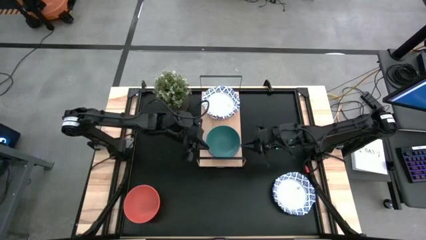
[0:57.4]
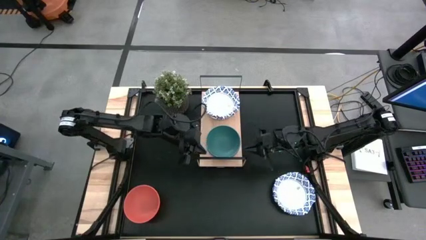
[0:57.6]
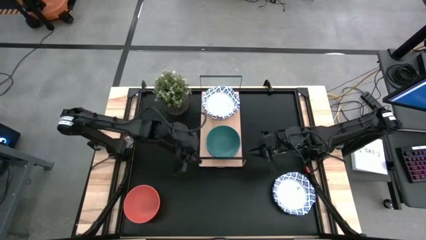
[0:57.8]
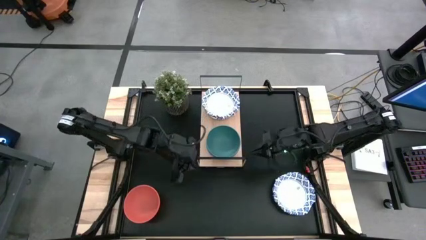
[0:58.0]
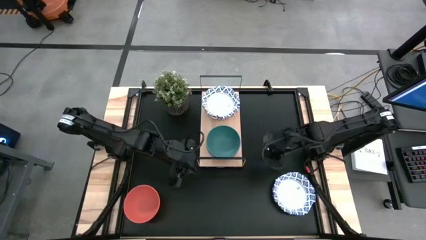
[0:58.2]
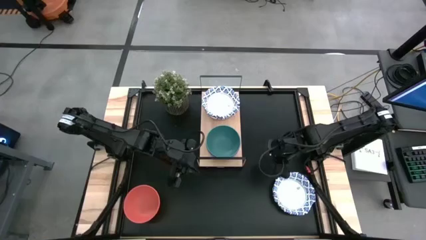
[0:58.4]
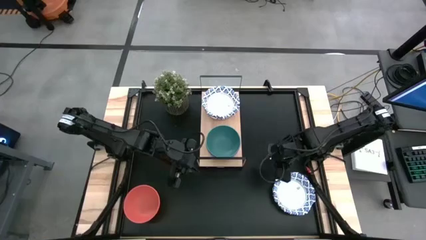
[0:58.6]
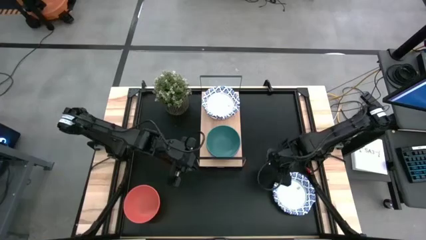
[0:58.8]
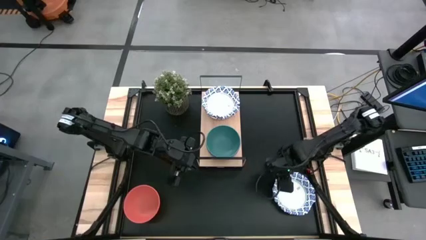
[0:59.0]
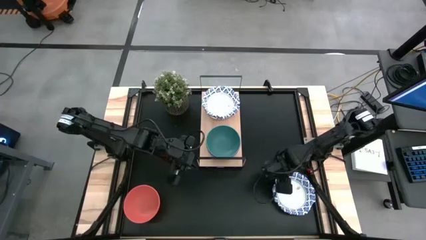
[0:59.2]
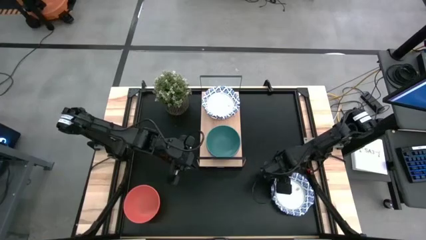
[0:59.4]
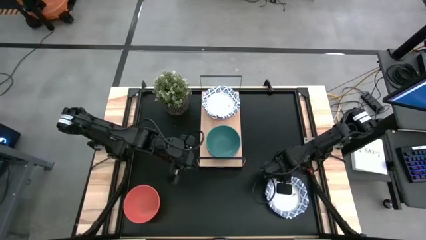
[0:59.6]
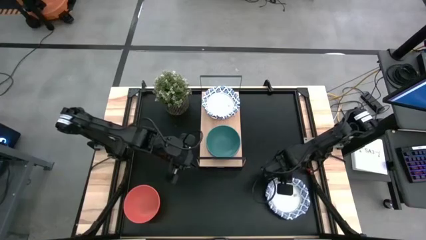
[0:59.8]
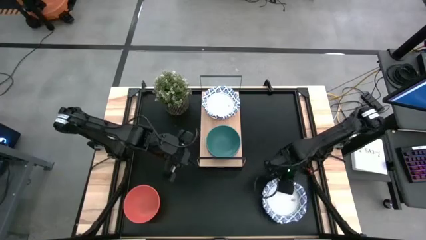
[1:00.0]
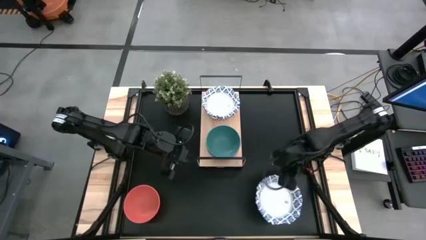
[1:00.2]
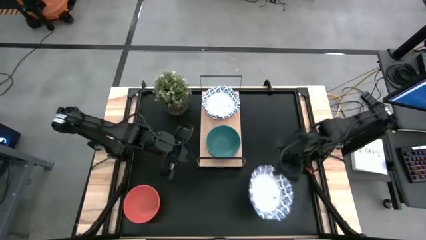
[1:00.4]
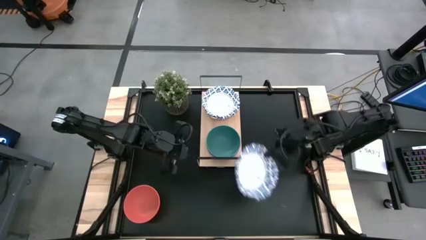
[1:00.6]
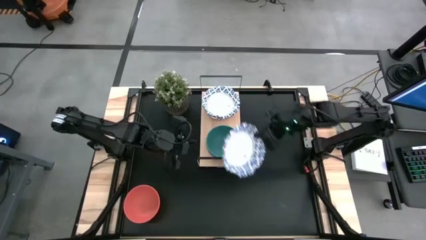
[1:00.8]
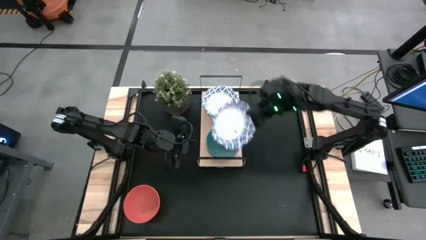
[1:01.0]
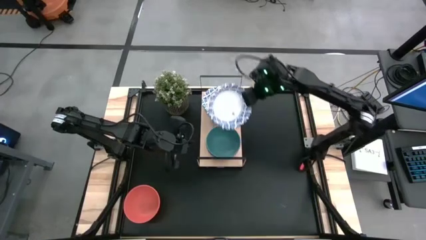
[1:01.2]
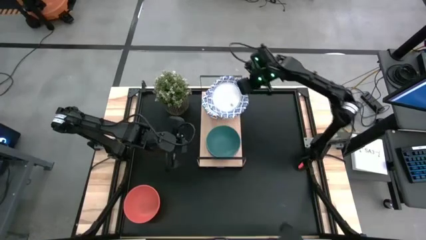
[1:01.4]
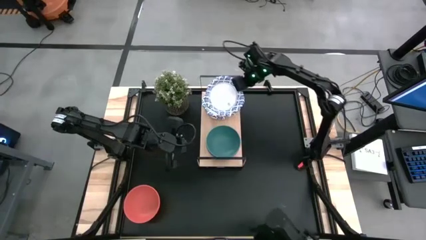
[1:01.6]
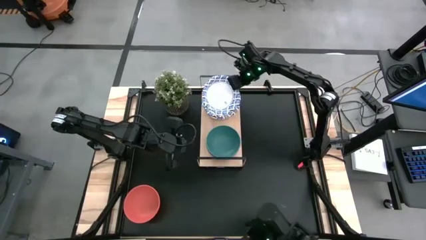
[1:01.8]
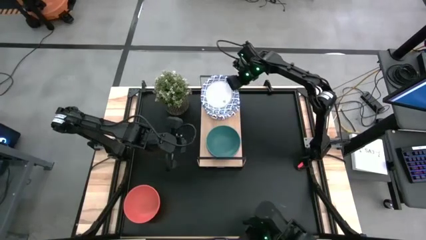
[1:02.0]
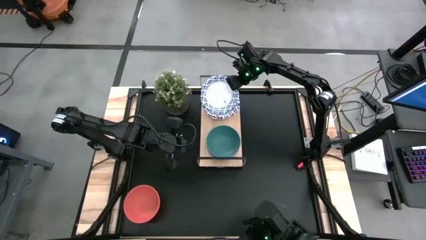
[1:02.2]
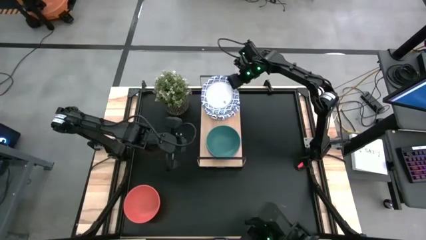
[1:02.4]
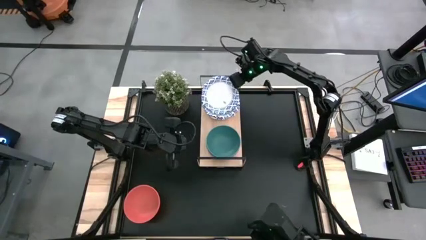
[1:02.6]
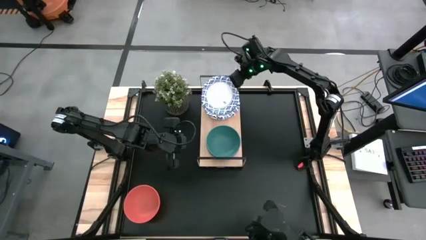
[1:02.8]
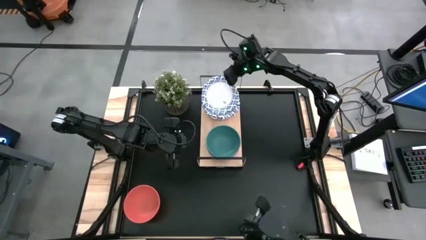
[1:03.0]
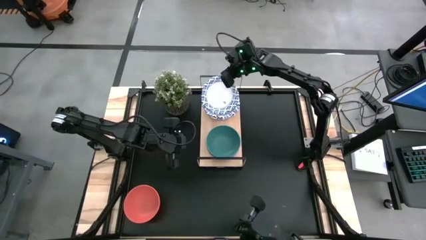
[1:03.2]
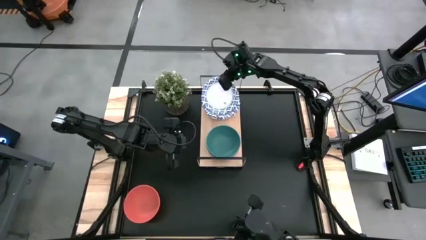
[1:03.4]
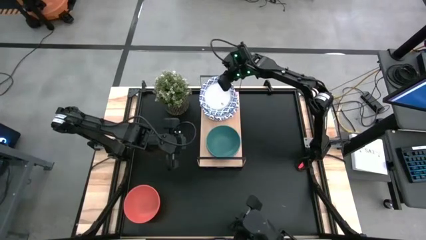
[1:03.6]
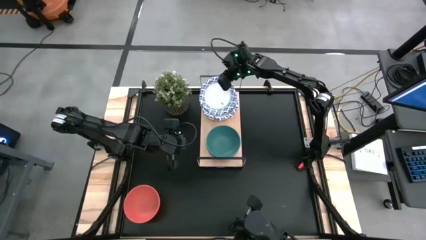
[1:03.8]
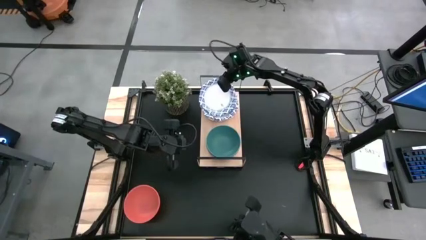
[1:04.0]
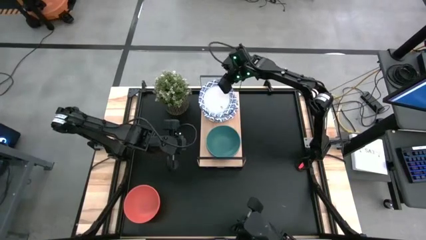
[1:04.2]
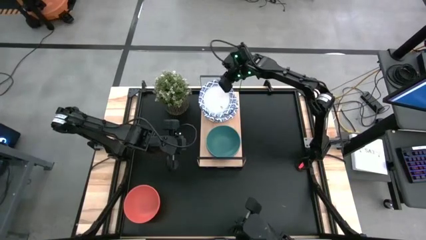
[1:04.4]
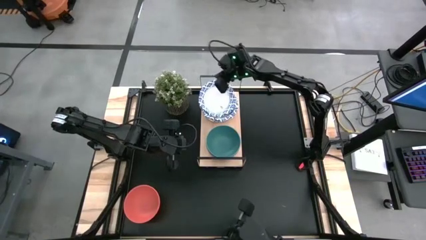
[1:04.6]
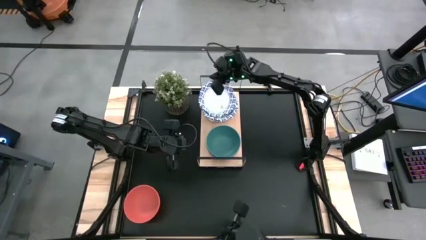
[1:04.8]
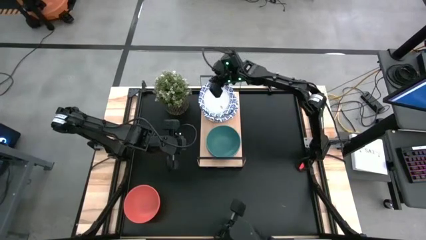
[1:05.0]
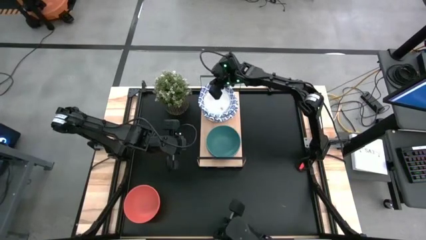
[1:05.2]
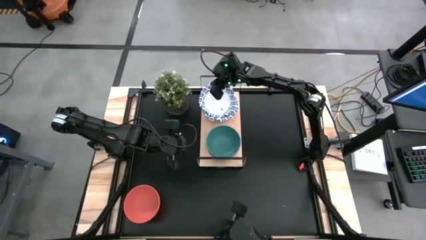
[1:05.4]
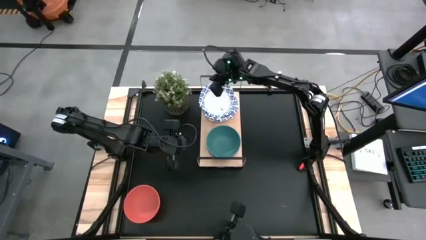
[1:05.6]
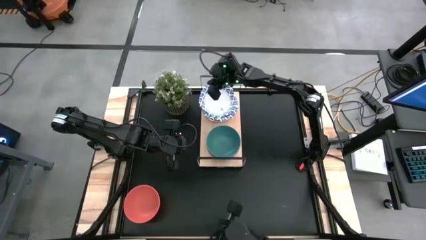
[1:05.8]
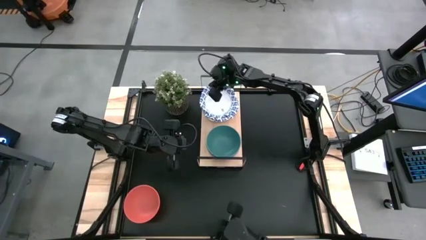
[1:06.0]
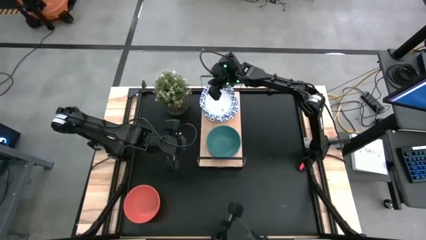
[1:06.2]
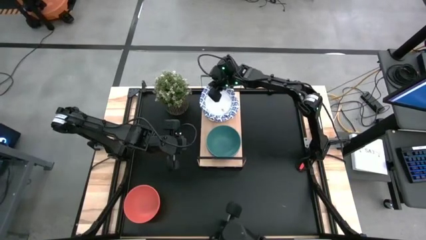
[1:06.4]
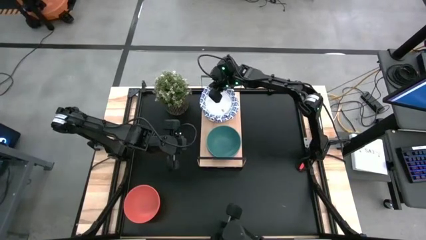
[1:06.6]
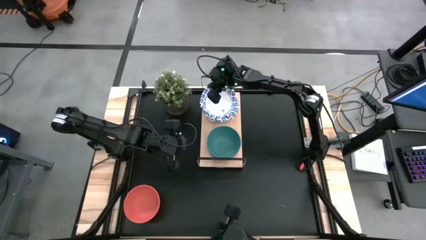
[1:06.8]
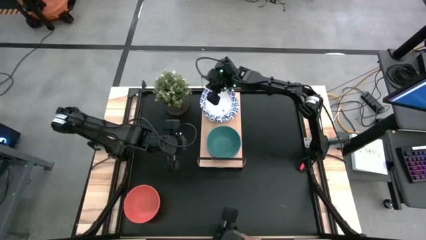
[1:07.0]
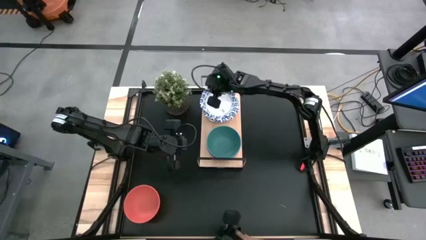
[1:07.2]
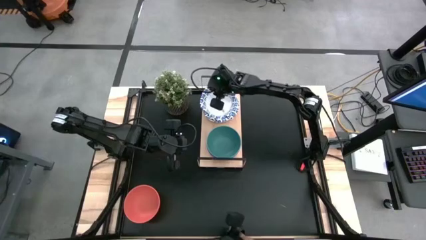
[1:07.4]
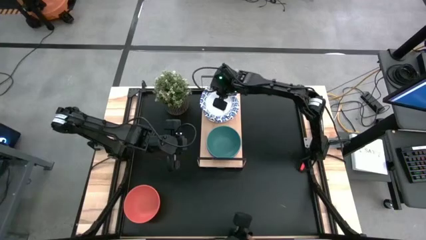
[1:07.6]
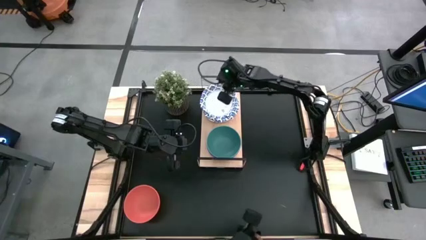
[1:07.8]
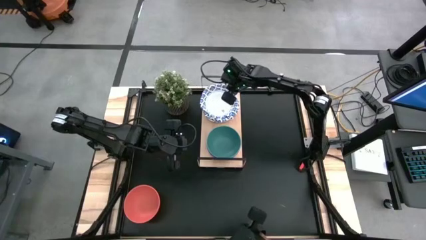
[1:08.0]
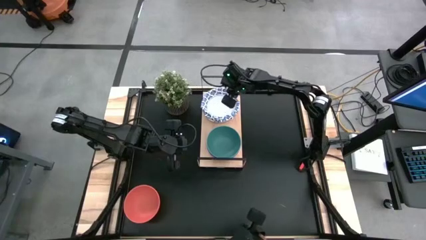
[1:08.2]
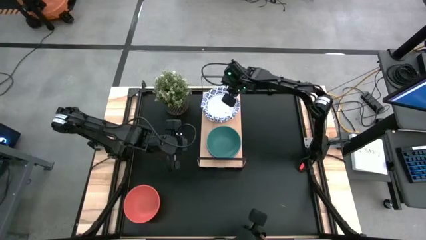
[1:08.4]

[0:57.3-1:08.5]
Task: Place and stack bowls onto a shelf
Stack the white paper bowl on top of the white paper bowl on the shelf

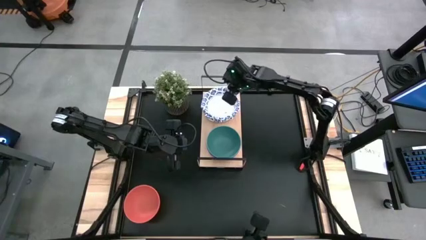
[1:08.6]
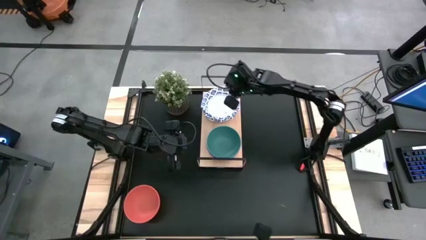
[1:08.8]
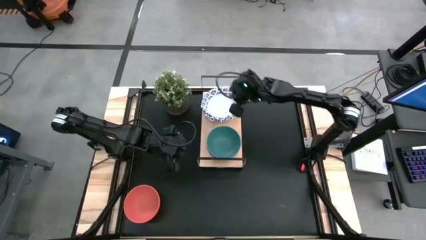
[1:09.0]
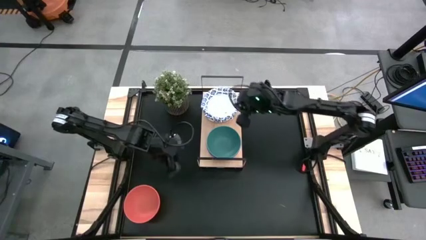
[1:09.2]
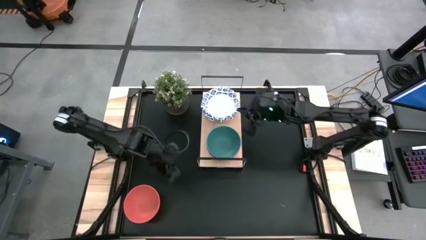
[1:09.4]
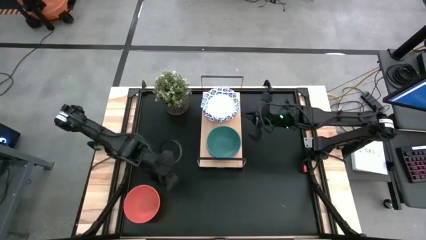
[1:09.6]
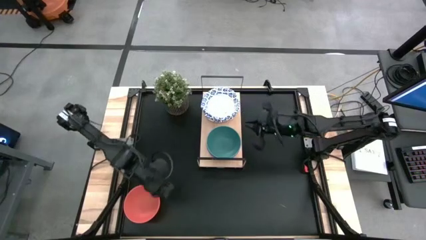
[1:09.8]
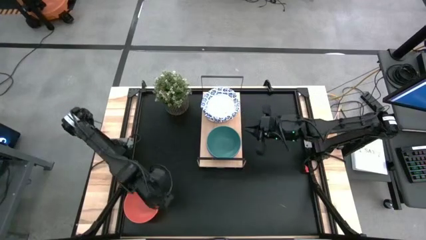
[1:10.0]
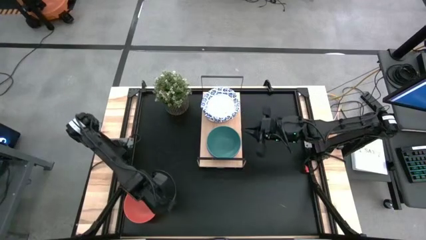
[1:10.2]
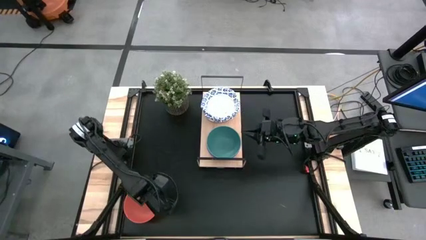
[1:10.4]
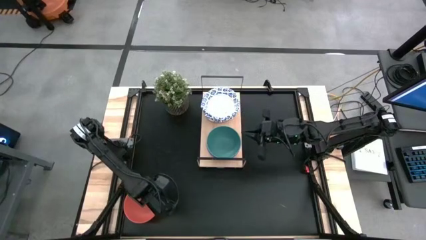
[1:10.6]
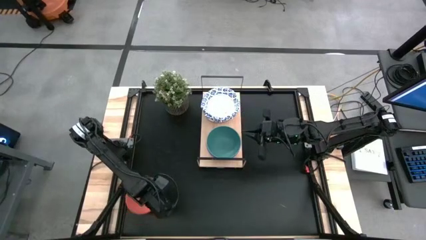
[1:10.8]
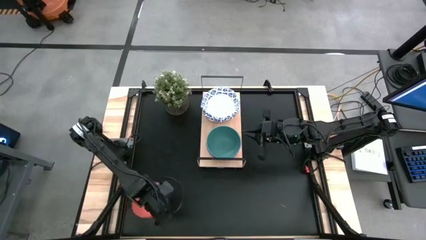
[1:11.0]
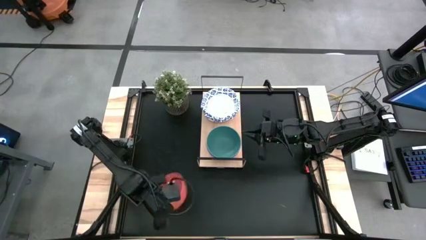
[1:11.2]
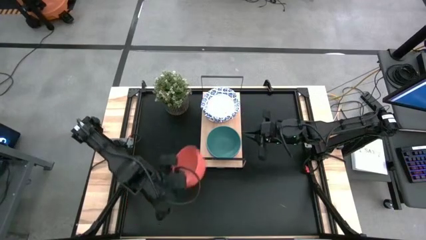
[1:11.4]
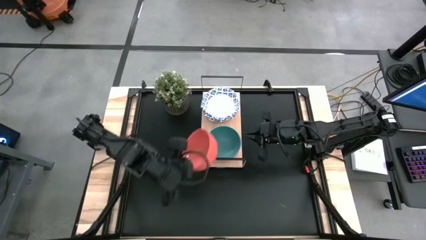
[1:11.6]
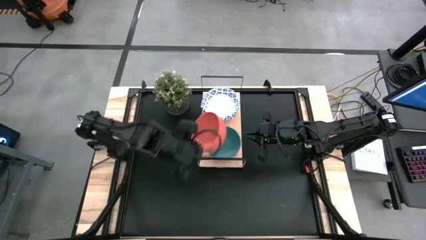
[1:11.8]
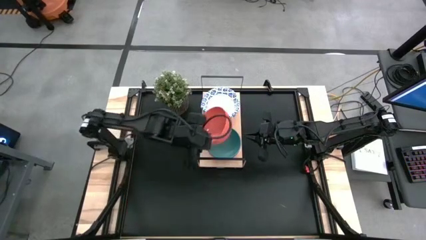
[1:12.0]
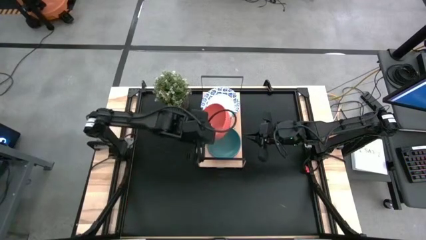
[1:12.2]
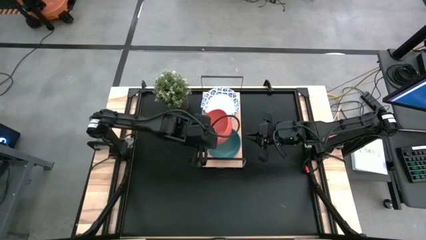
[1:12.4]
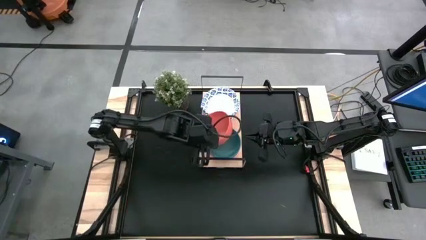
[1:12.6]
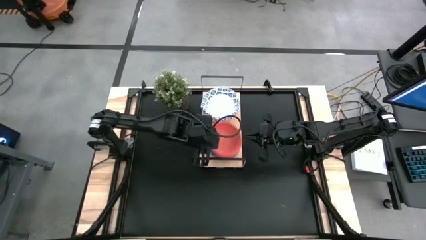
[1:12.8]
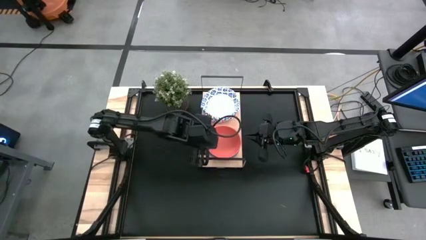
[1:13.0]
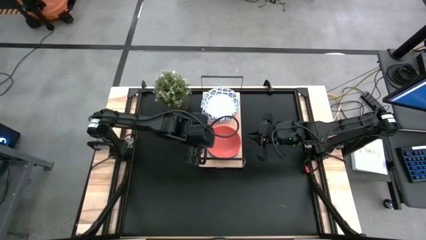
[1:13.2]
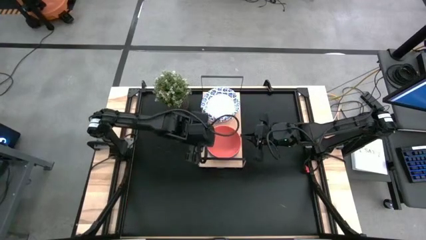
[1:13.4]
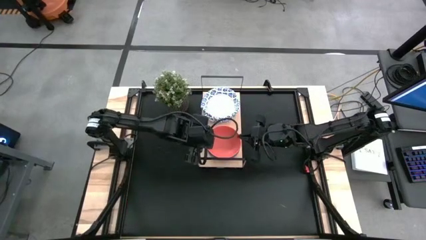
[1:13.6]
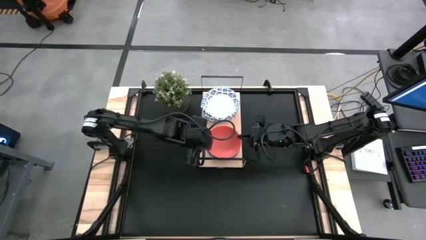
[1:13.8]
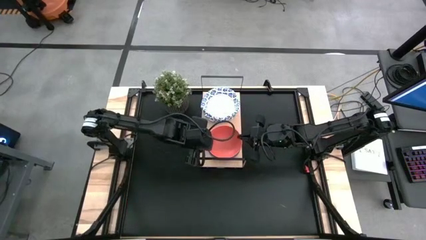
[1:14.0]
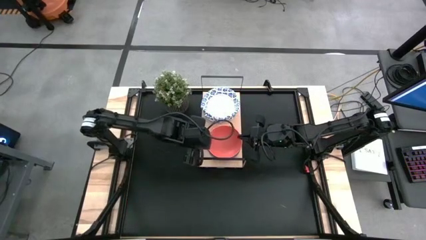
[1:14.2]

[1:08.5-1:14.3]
Stack the plastic orange bowl on top of the plastic green bowl on the shelf
